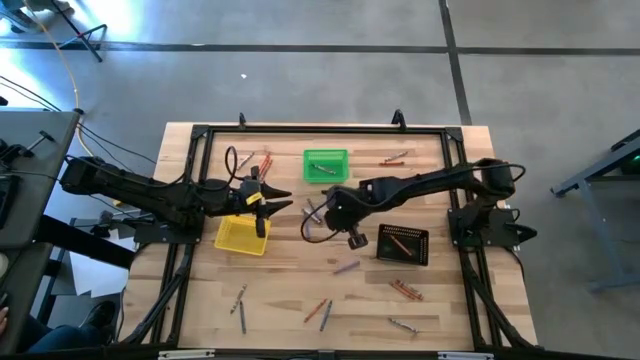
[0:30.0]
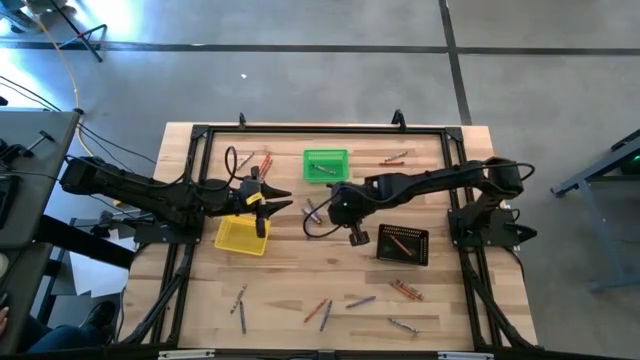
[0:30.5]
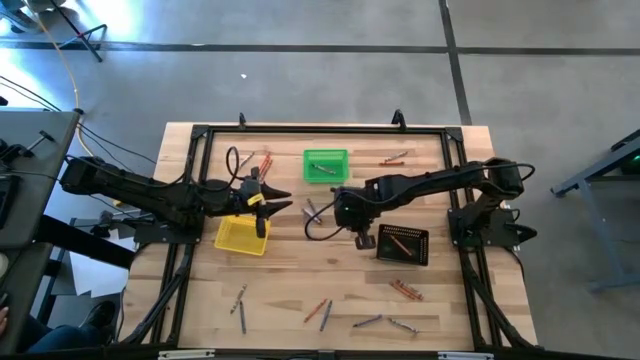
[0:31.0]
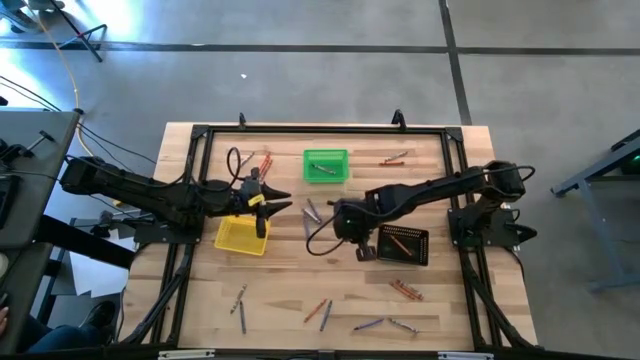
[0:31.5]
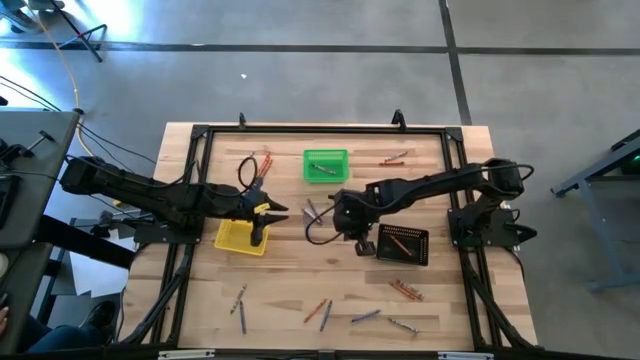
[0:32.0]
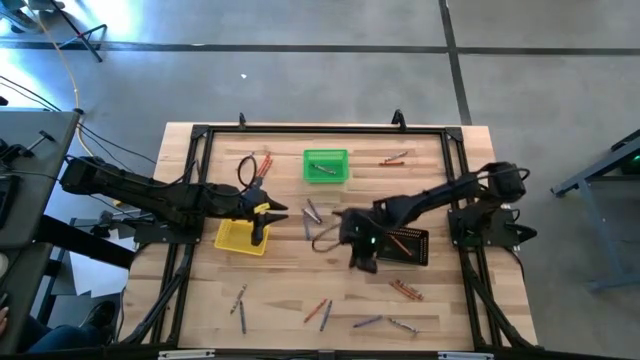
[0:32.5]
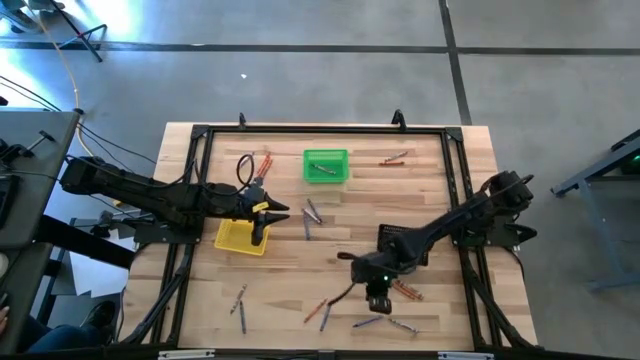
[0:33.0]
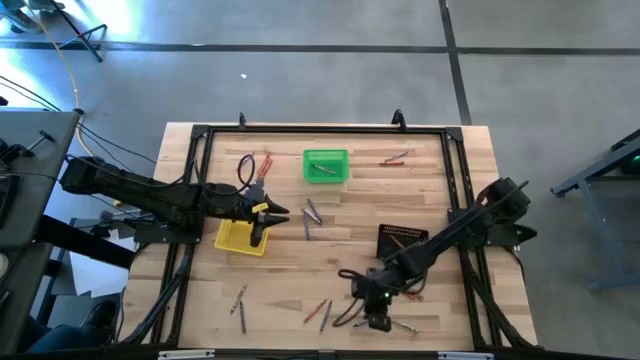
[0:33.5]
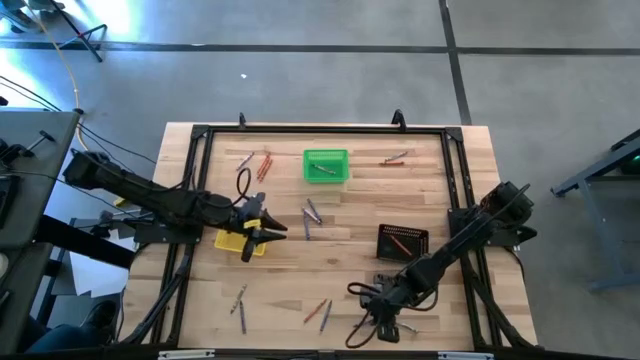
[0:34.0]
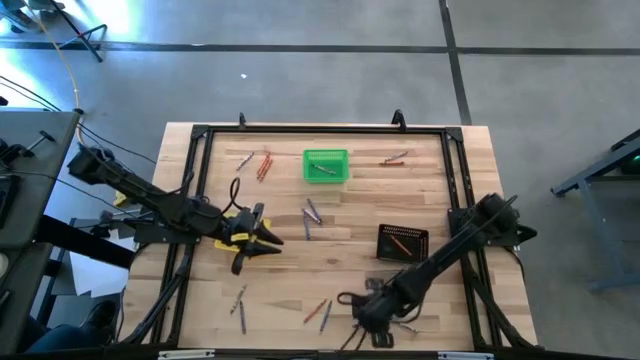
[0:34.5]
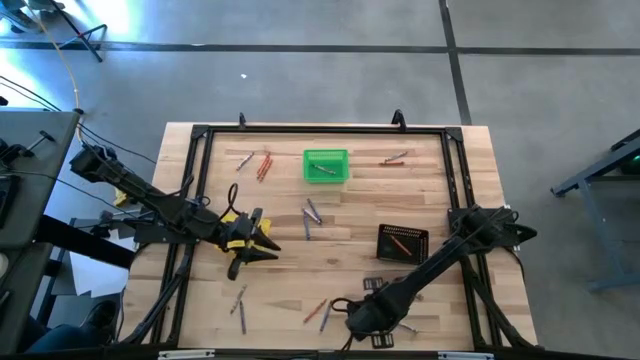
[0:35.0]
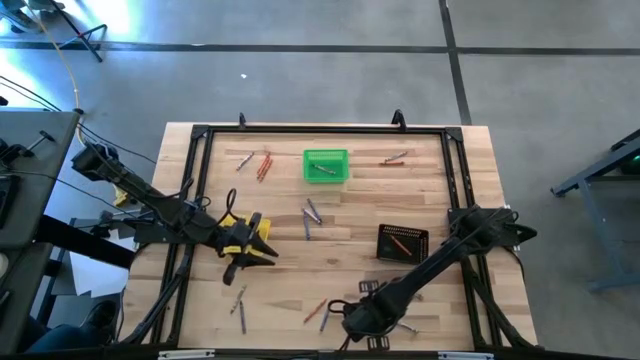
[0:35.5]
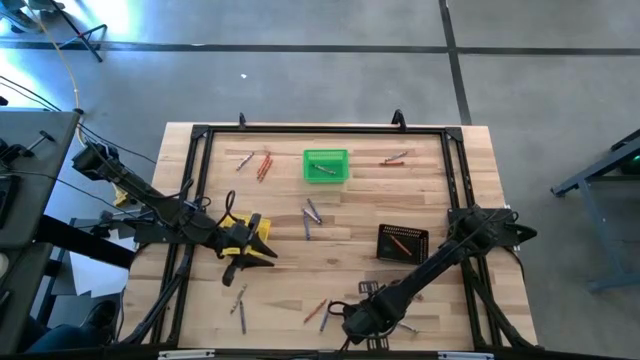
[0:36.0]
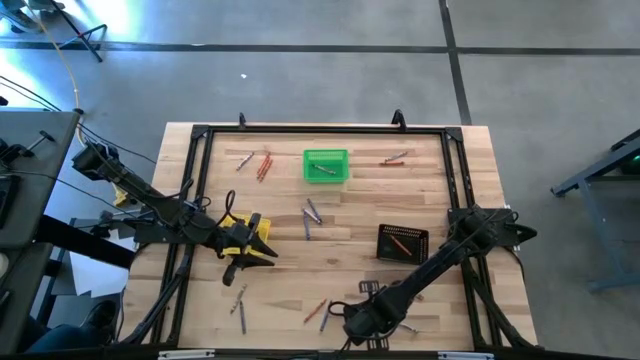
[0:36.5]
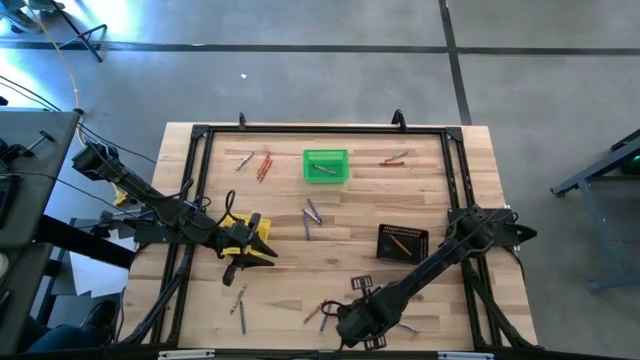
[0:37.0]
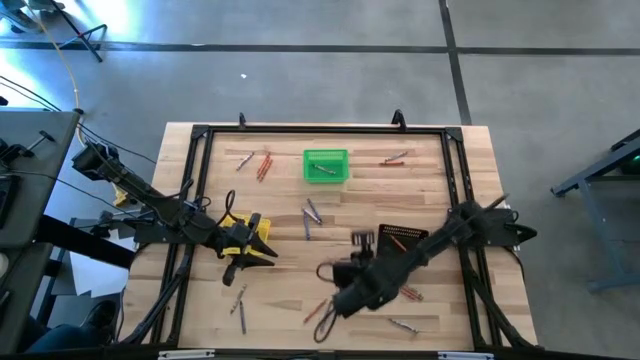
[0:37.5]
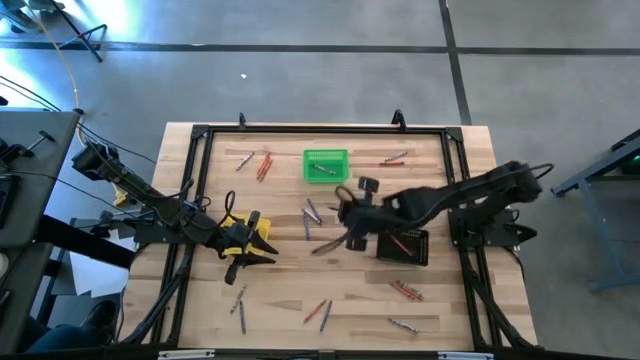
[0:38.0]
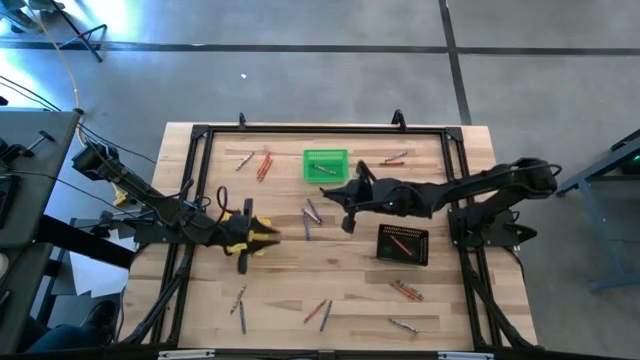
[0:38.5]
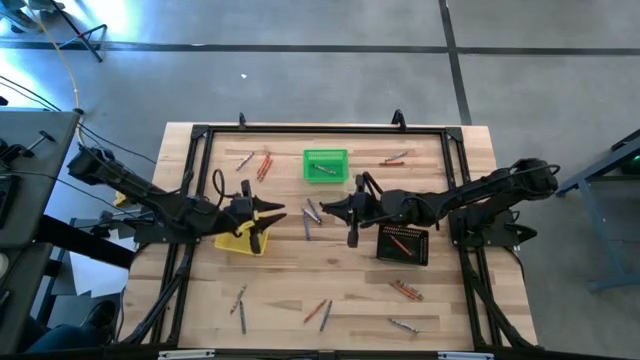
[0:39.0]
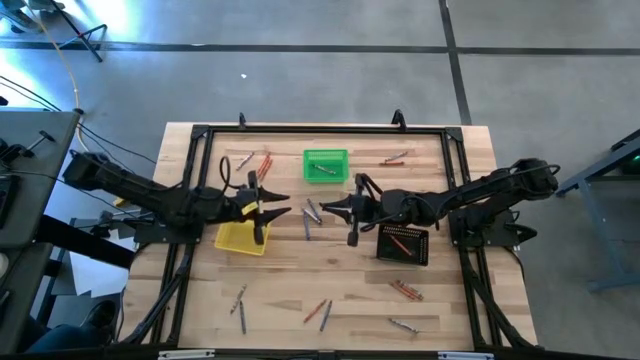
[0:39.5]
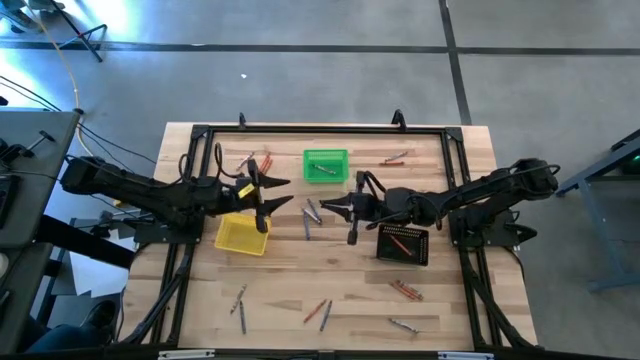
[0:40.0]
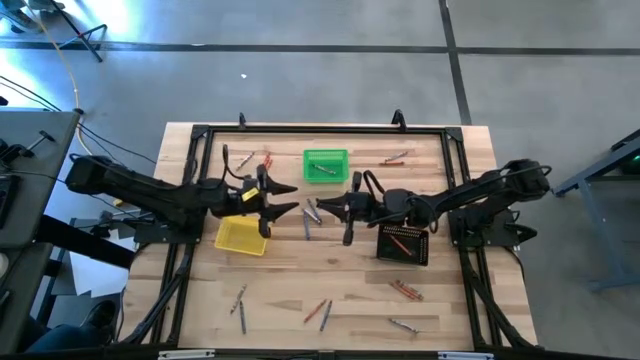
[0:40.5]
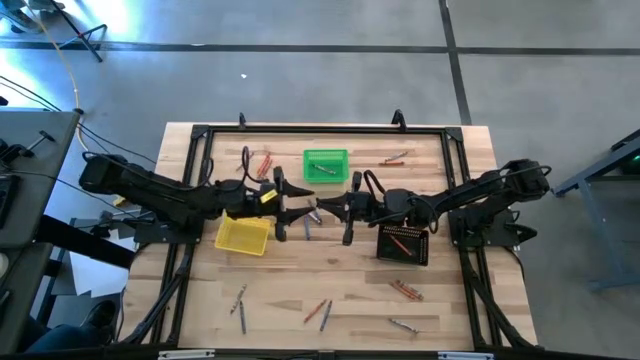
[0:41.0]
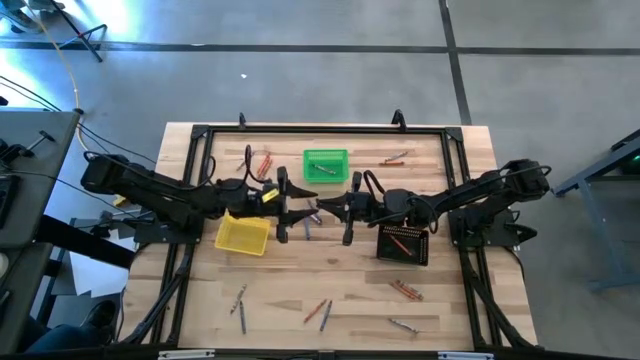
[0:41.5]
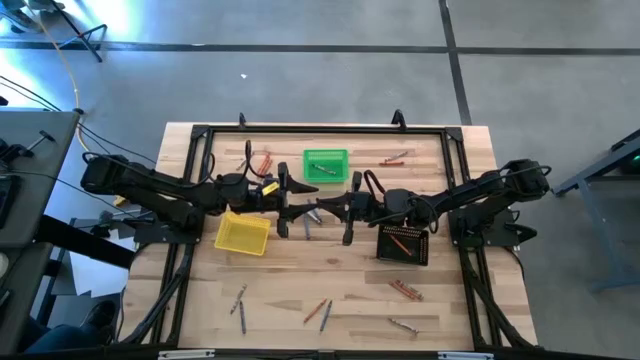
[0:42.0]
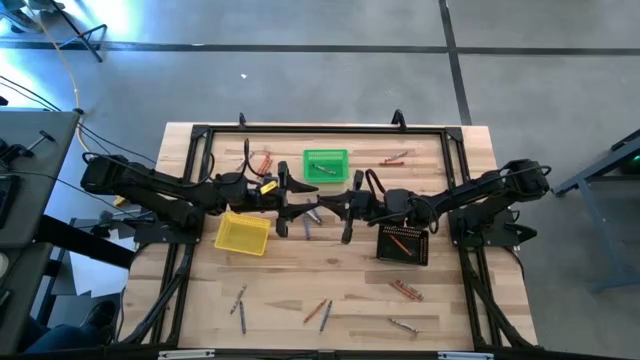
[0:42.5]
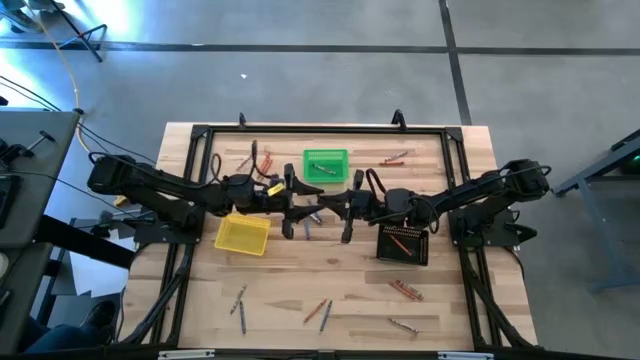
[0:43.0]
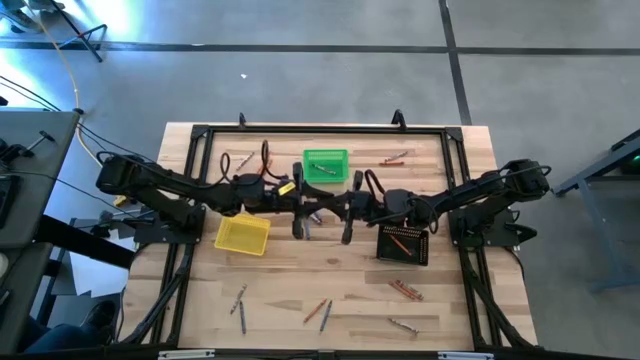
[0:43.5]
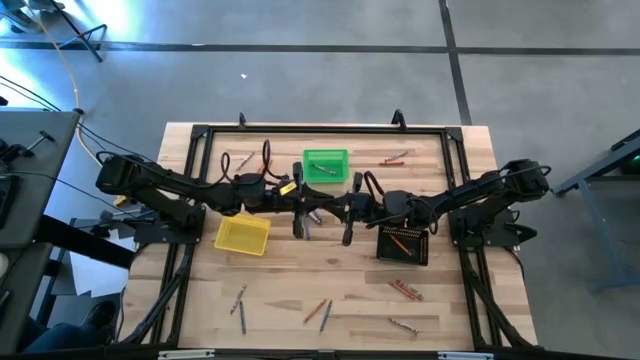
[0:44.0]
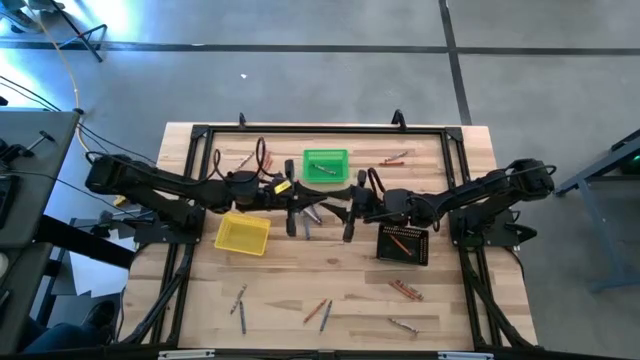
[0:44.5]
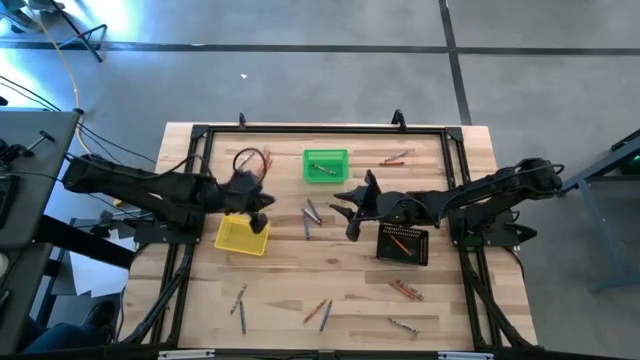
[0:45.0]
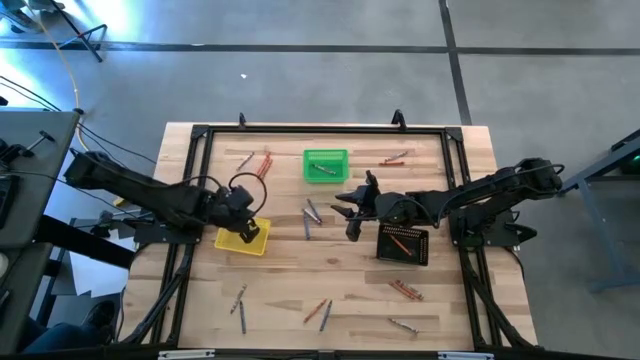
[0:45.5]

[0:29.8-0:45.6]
Task: Sort crayons
Put the blue crayon into the yellow basket

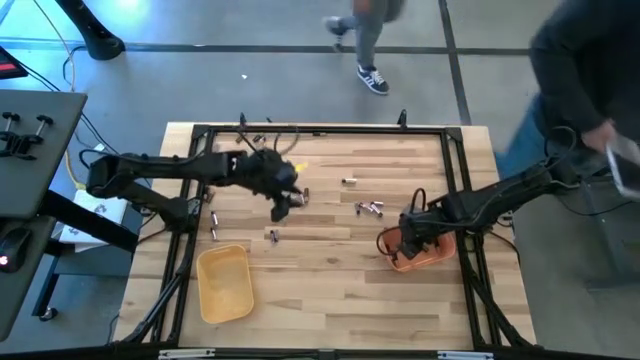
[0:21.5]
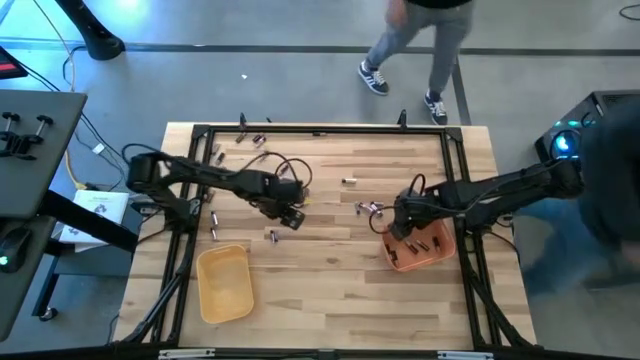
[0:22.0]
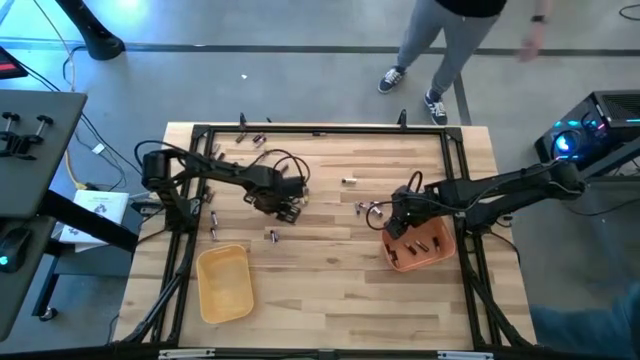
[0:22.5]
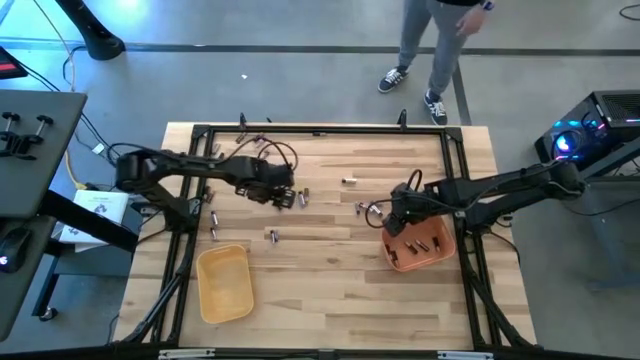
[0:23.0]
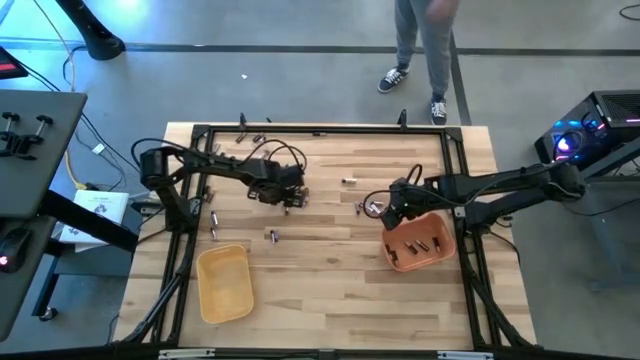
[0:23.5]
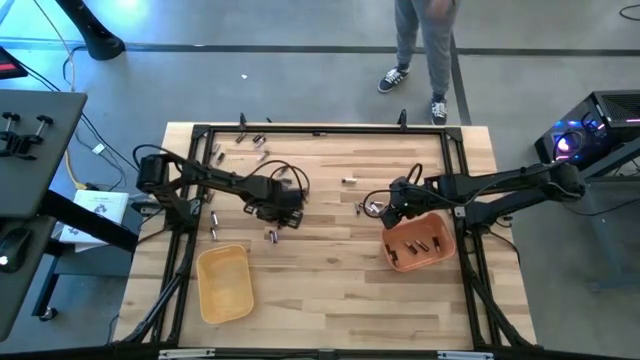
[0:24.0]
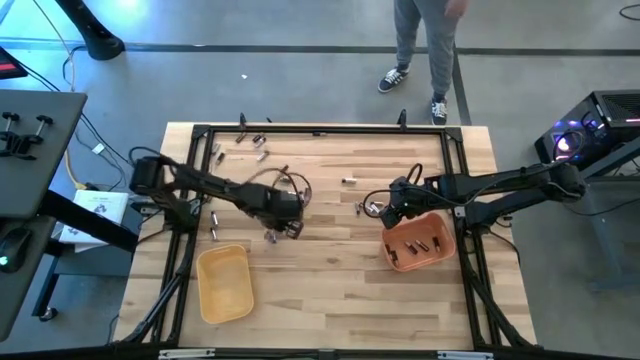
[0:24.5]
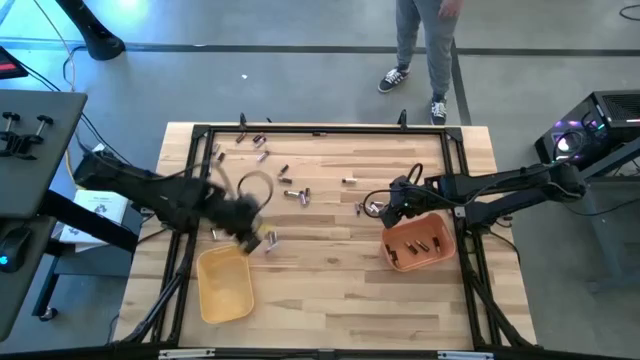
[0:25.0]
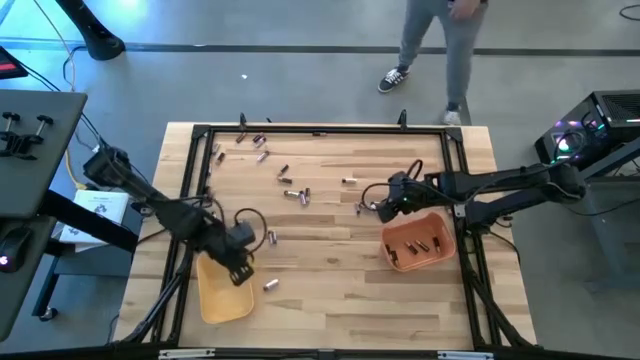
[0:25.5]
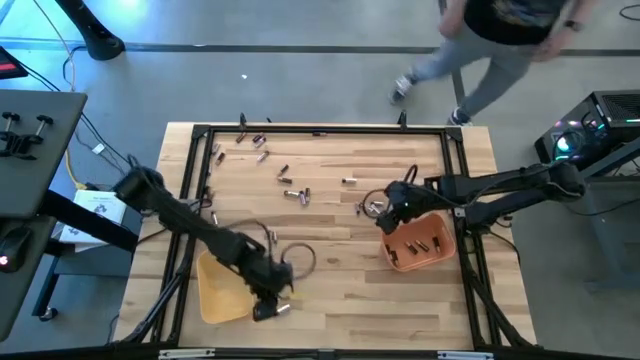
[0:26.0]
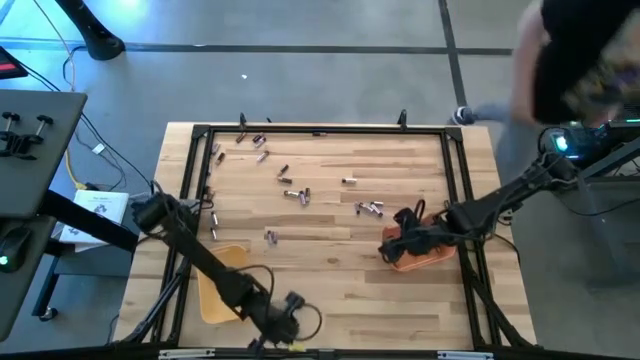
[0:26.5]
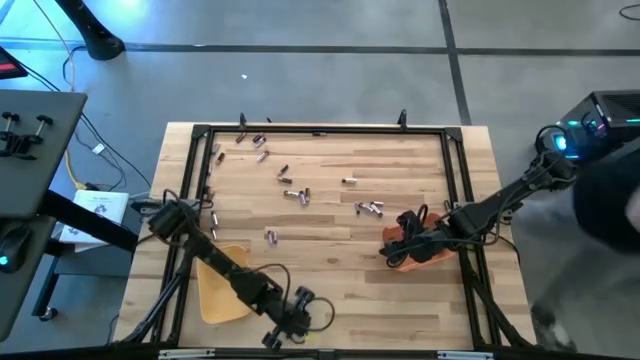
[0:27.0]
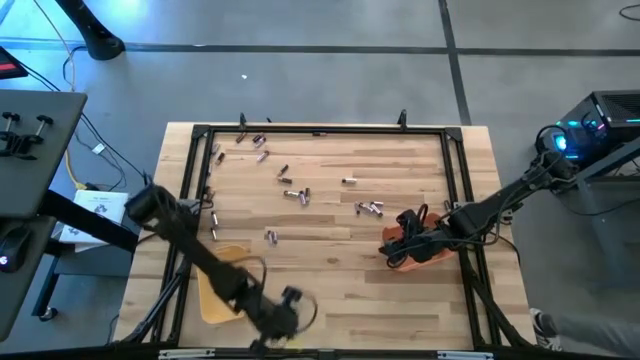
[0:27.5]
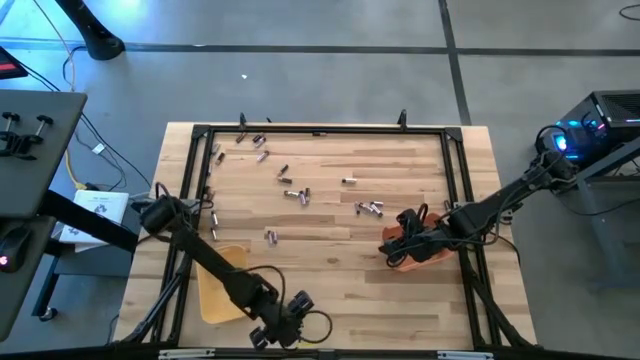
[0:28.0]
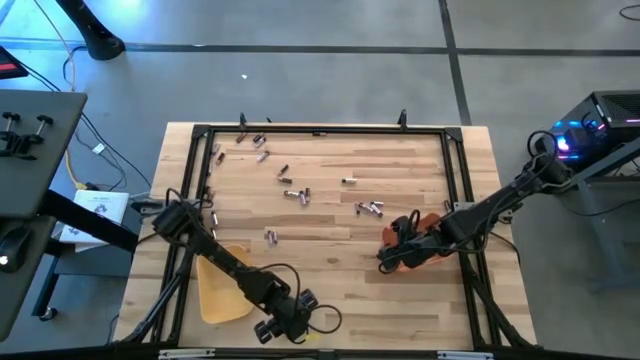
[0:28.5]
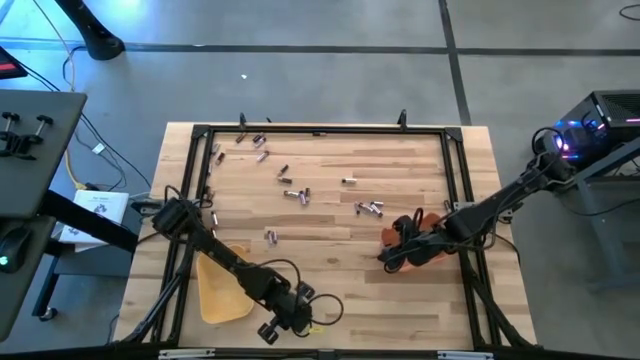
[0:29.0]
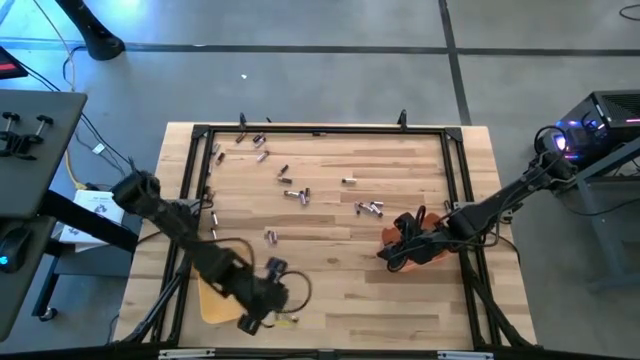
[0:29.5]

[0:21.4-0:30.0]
Task: Sort batteries
Put the silver battery into the yellow bin
